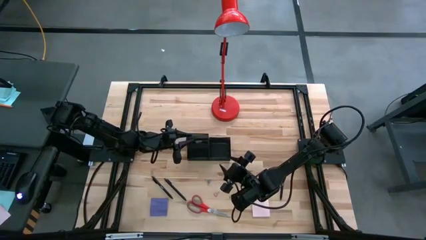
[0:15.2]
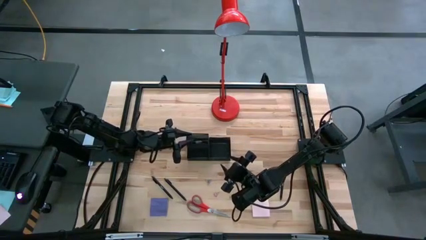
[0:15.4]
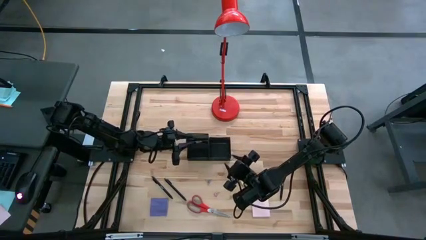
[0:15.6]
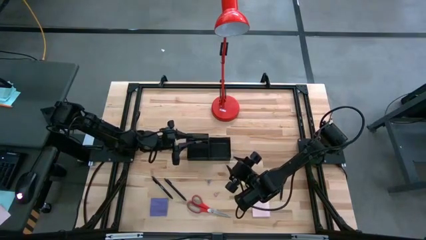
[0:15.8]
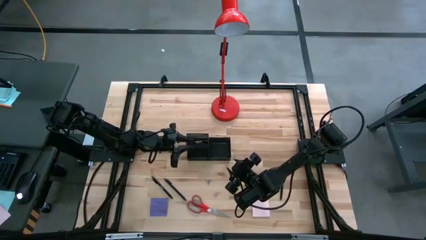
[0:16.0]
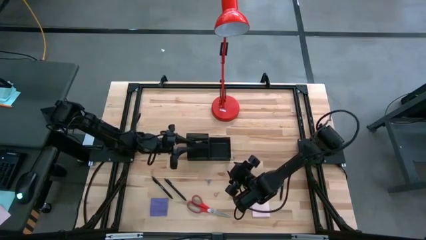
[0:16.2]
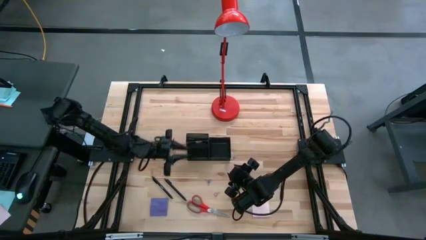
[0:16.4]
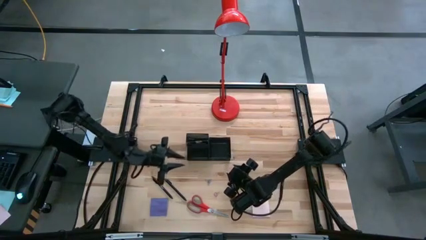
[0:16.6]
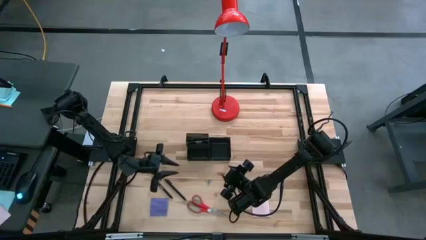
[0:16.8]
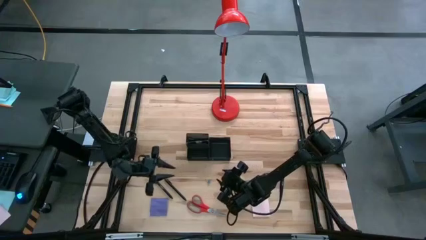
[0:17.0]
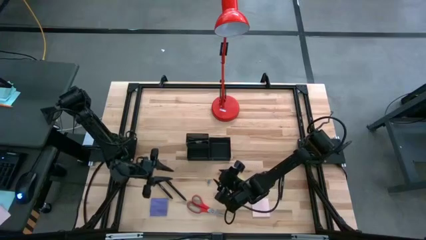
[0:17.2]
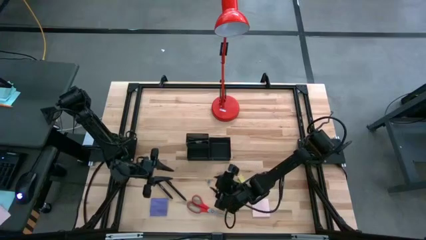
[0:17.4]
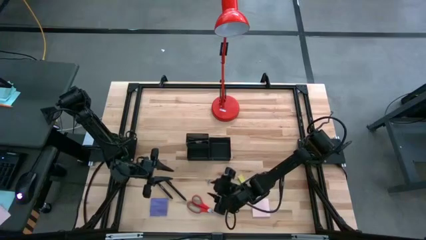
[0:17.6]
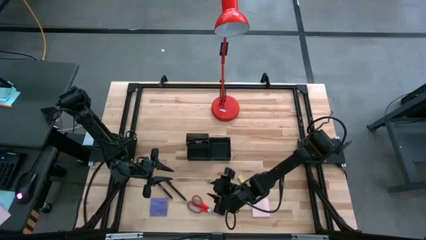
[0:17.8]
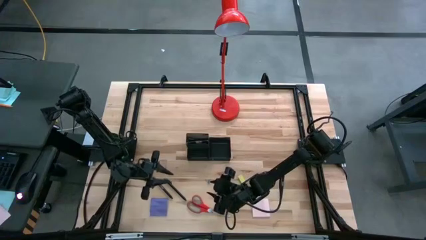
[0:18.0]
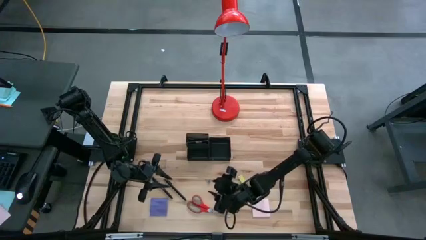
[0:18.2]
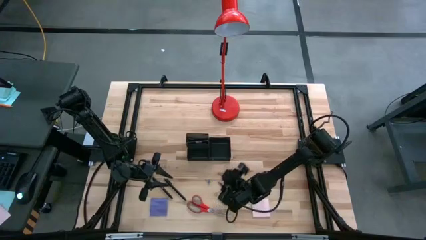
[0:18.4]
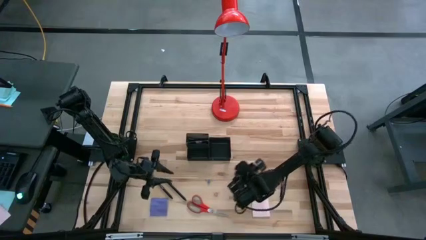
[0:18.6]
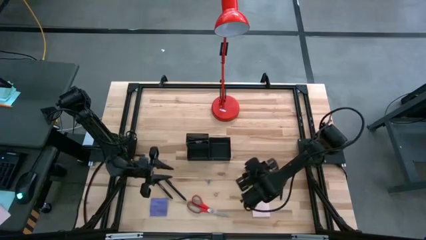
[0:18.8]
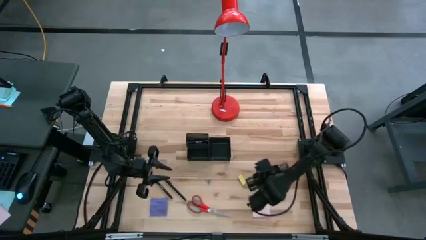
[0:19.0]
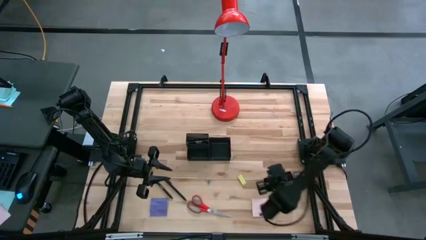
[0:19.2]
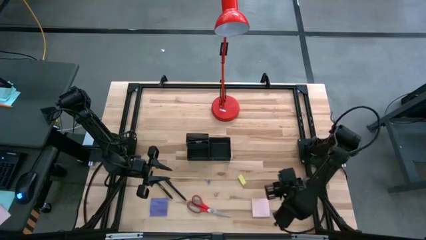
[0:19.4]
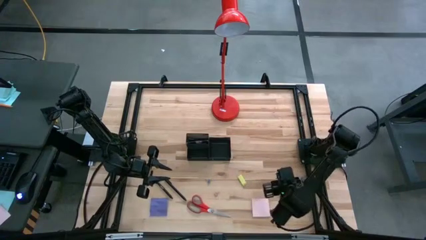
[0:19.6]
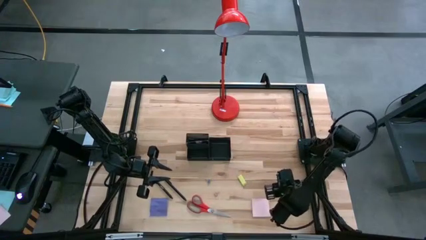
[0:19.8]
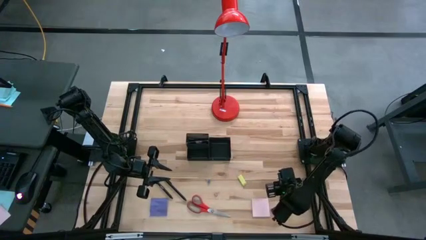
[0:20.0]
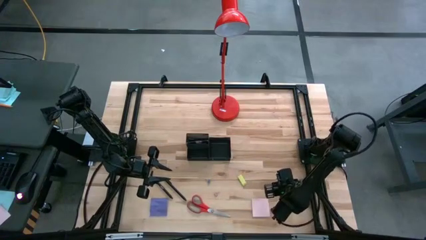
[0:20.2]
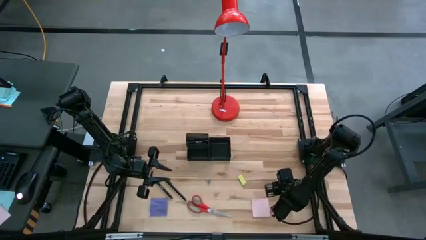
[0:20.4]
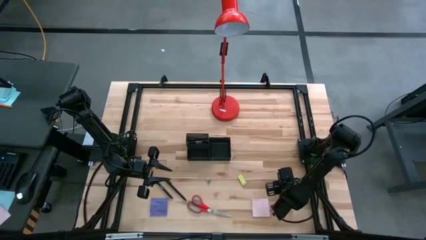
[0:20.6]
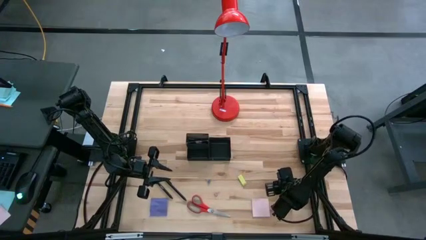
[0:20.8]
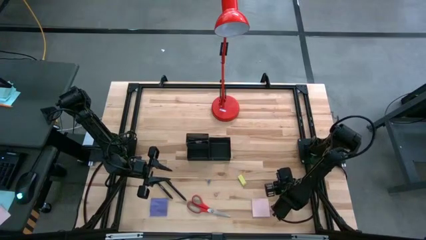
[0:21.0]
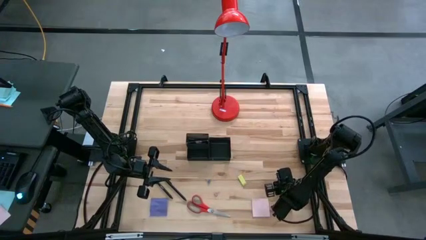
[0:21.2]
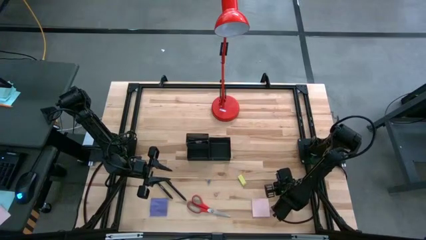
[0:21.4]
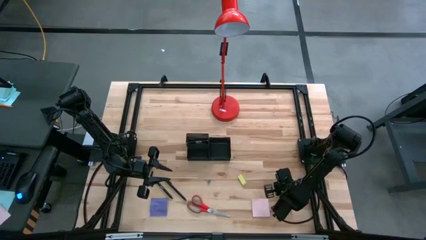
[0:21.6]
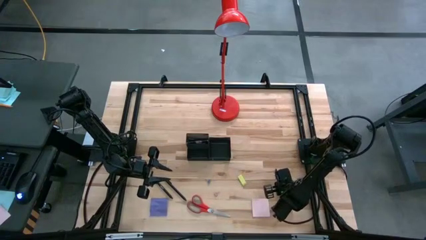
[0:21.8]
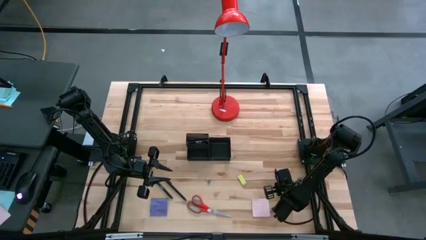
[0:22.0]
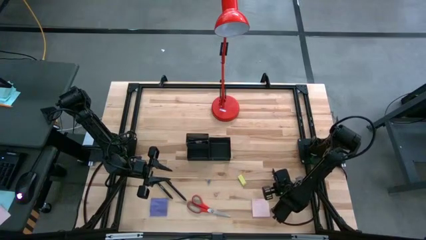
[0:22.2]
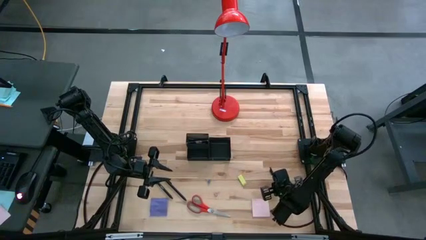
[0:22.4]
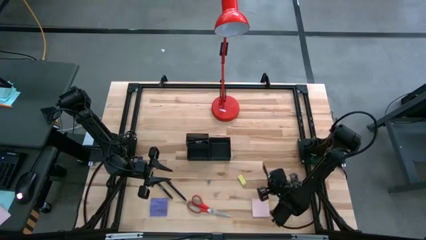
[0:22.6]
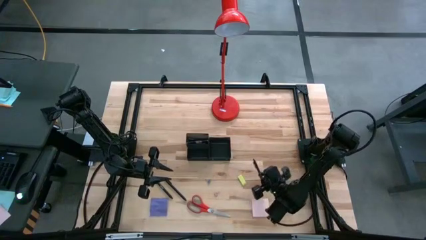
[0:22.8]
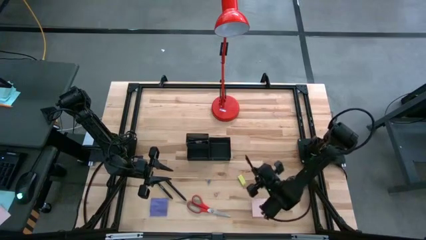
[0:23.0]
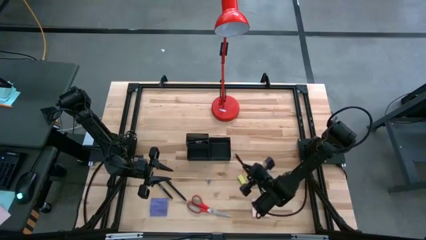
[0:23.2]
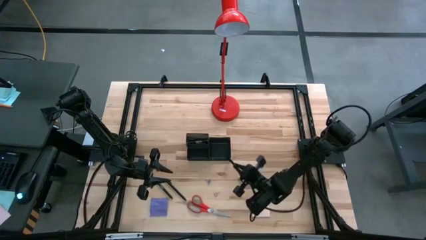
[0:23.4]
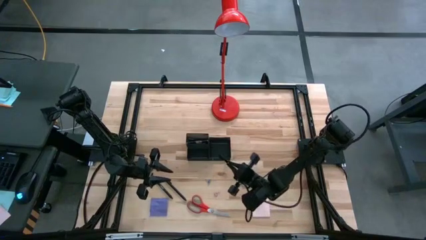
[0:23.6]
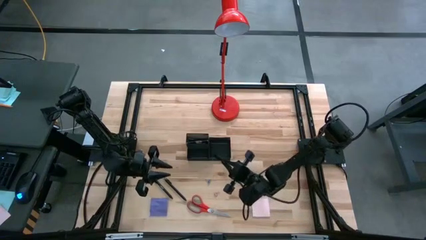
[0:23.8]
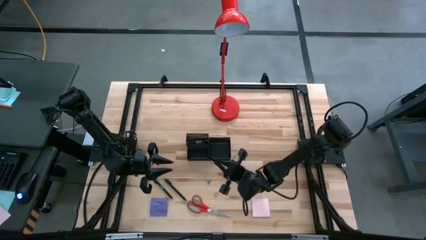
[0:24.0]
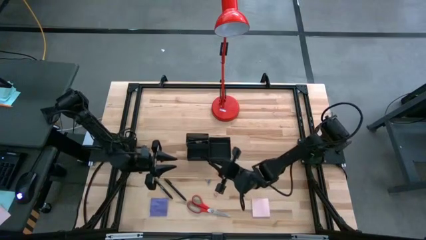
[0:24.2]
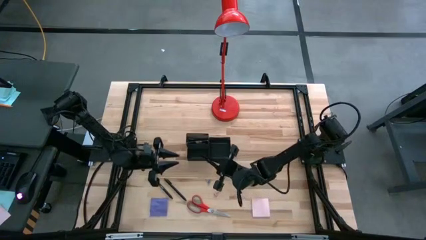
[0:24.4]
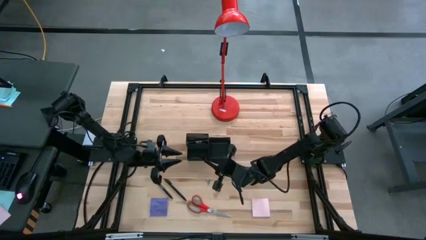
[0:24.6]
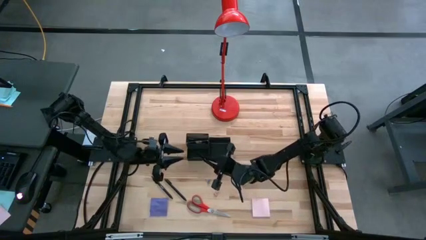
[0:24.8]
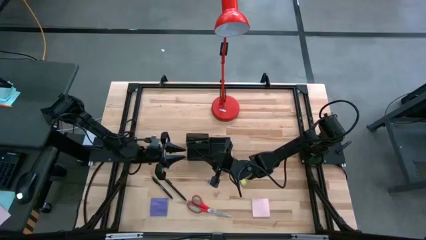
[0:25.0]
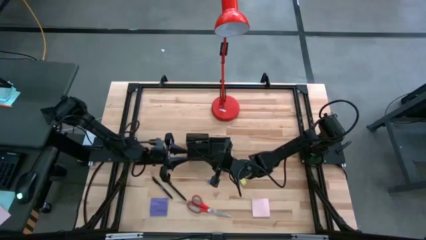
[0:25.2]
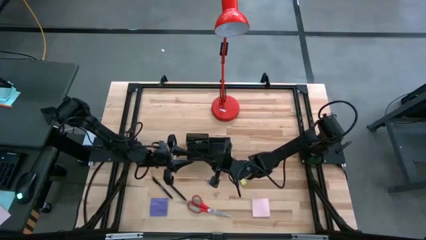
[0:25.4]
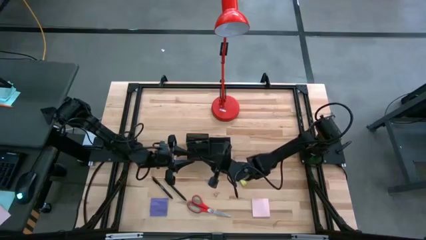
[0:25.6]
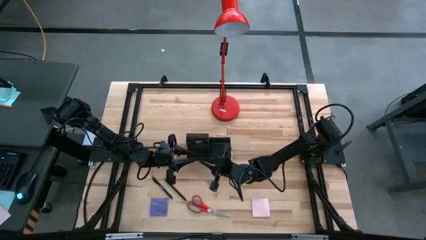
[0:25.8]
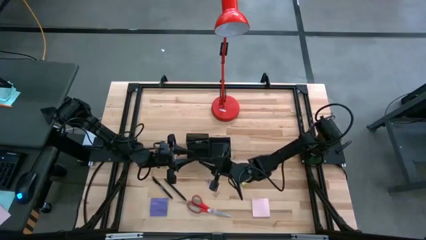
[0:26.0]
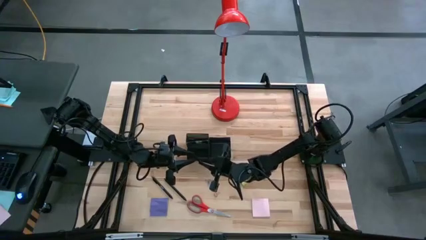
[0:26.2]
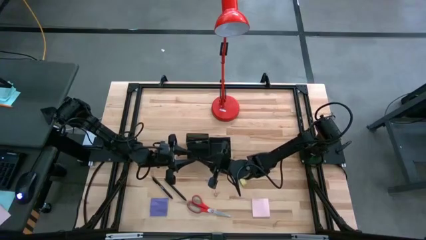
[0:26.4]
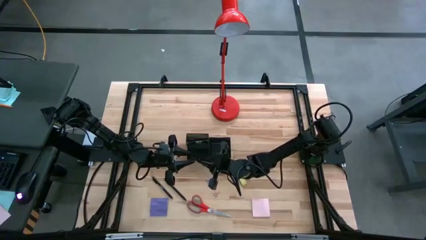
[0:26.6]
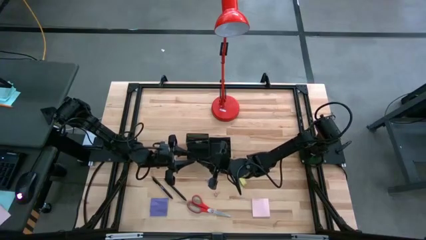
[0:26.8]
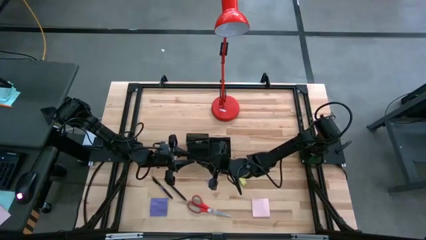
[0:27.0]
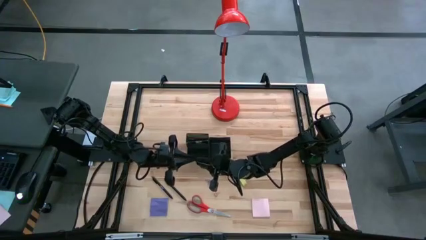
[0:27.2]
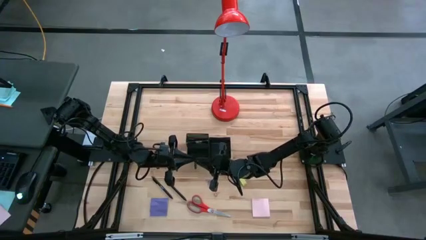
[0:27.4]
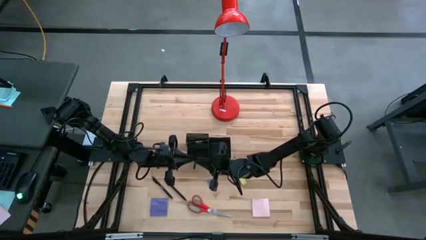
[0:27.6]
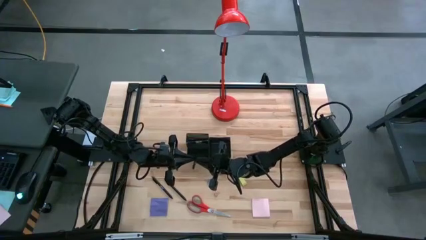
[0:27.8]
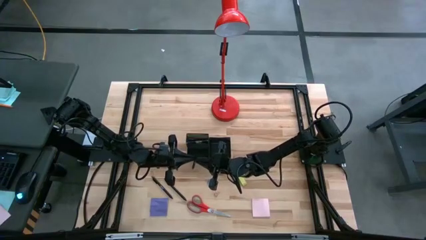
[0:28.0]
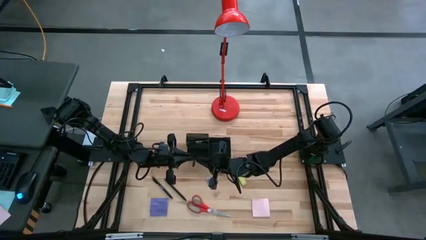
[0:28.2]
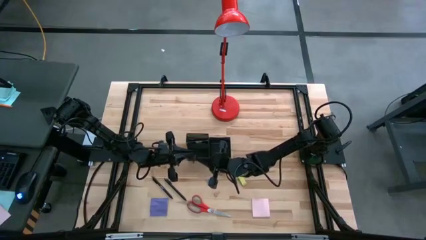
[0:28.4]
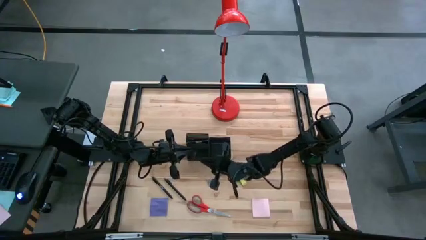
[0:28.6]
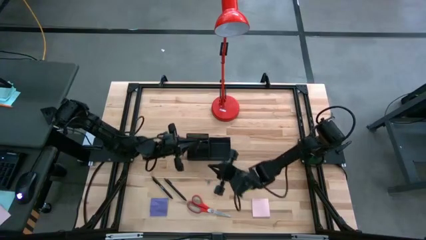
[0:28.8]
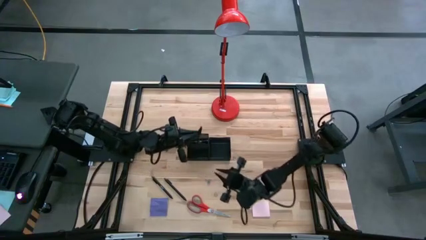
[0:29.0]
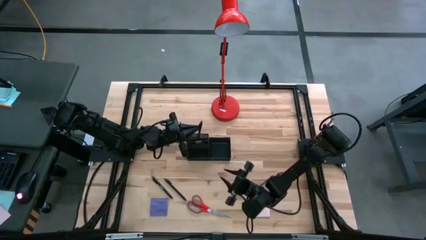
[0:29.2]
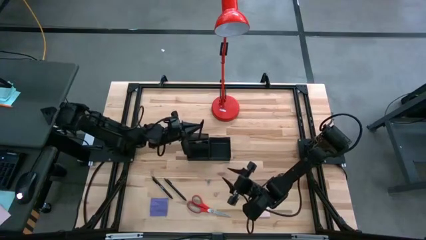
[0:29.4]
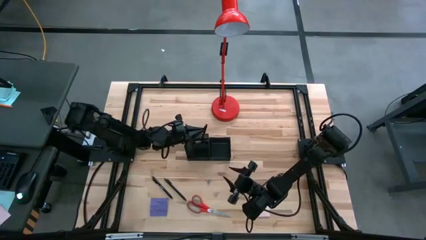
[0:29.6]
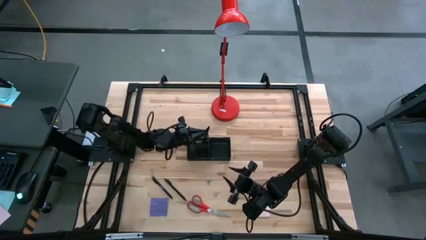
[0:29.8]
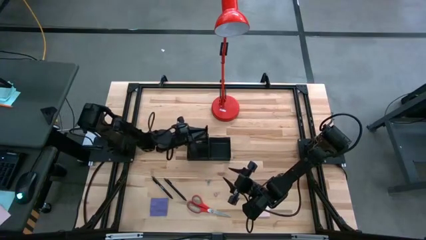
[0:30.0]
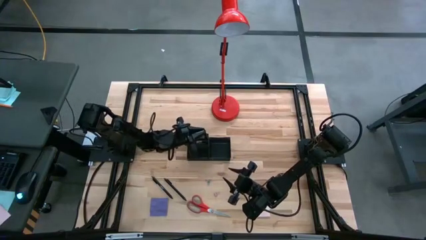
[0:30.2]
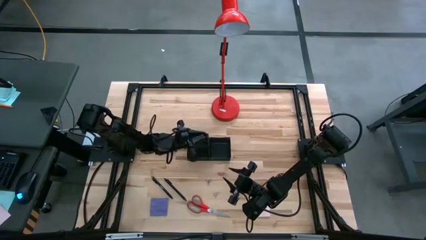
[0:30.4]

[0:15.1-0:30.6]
Task: Pick and place office supplies into organizer
Put the black pen into the desk organizer
